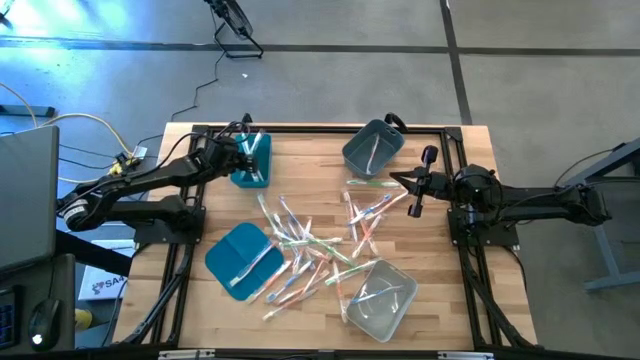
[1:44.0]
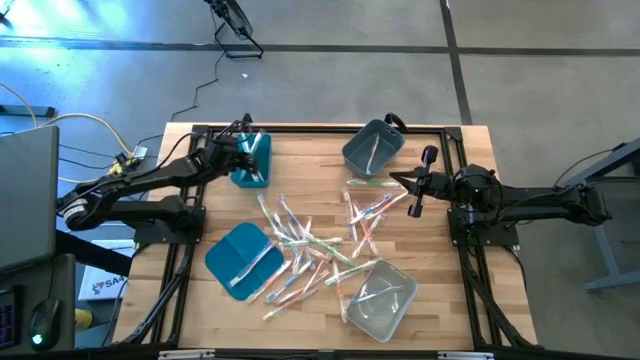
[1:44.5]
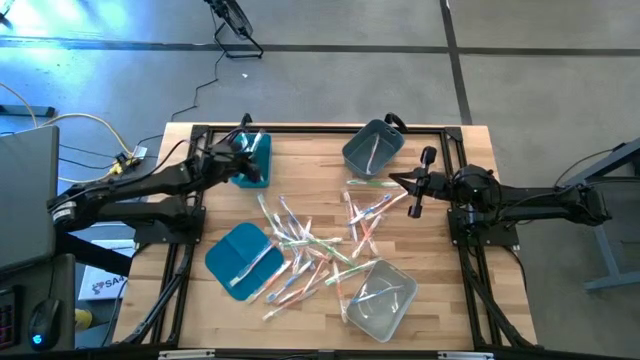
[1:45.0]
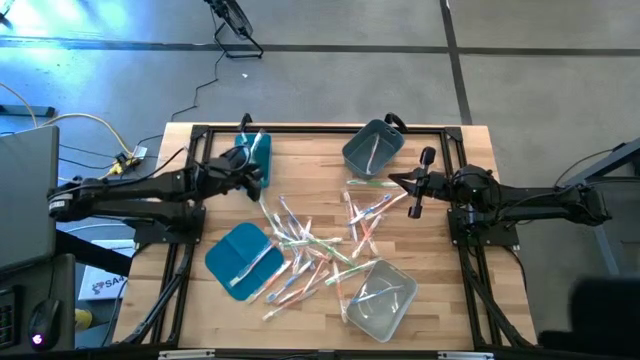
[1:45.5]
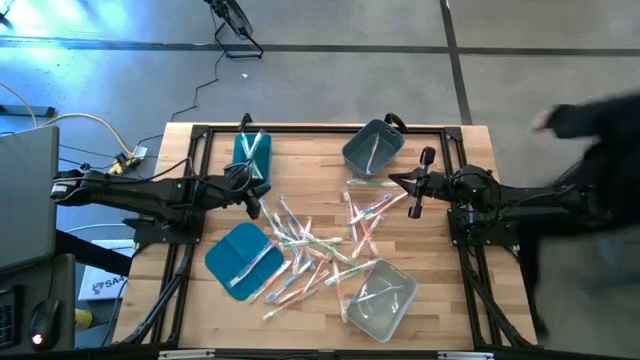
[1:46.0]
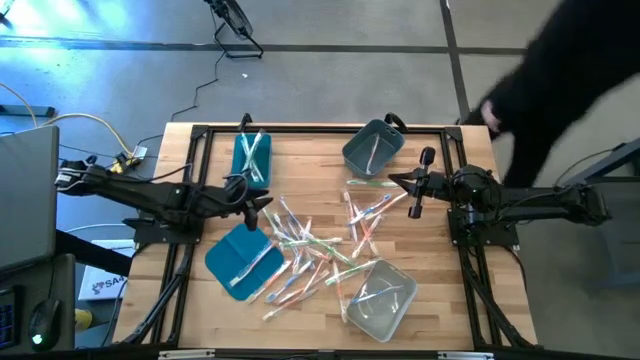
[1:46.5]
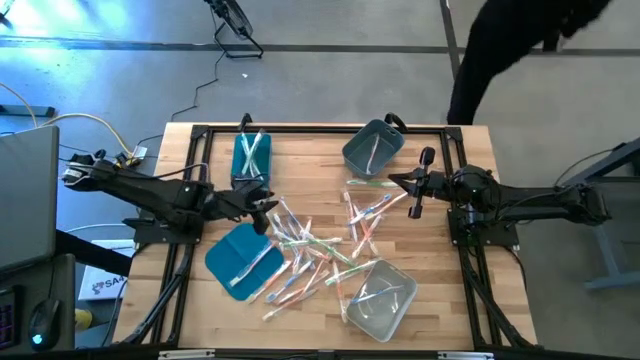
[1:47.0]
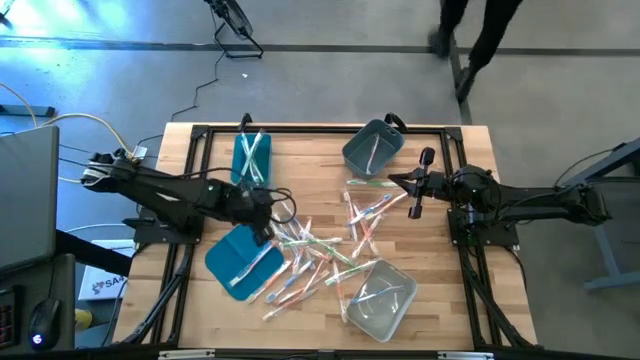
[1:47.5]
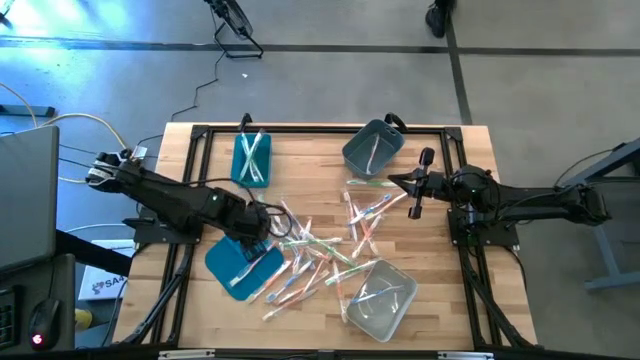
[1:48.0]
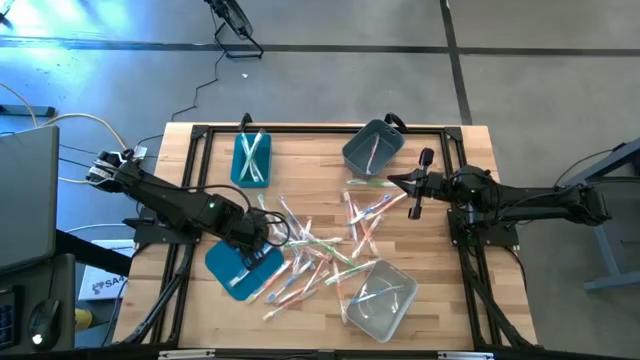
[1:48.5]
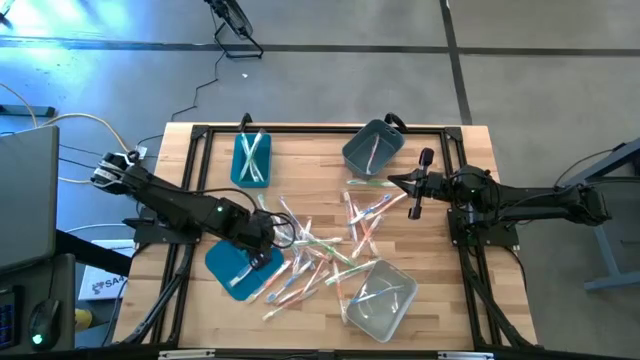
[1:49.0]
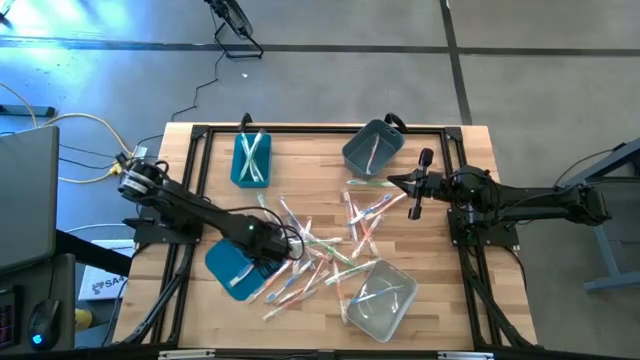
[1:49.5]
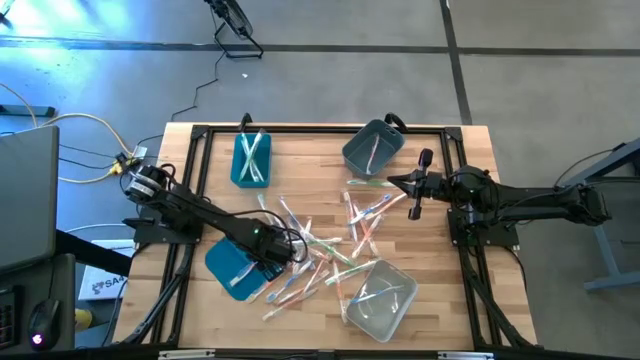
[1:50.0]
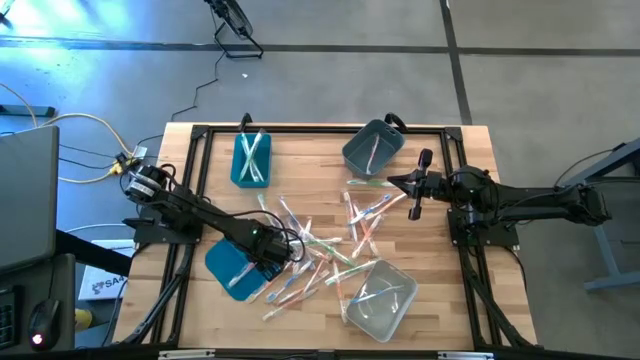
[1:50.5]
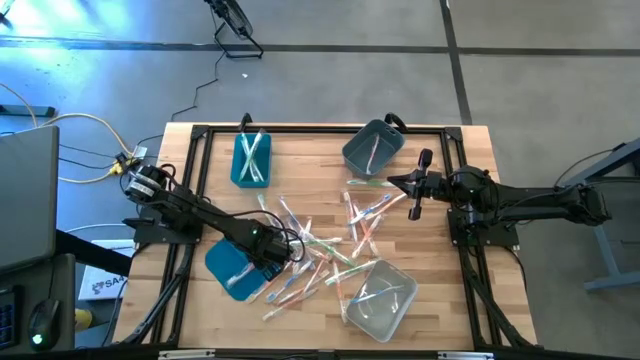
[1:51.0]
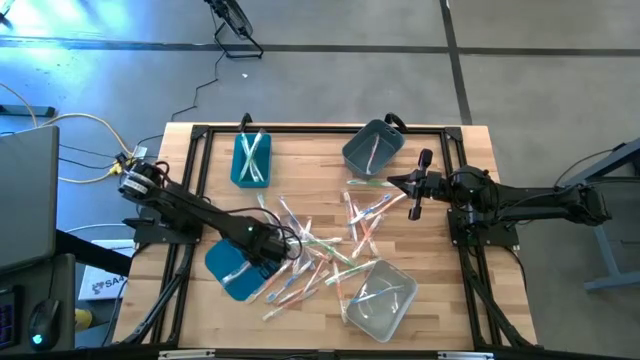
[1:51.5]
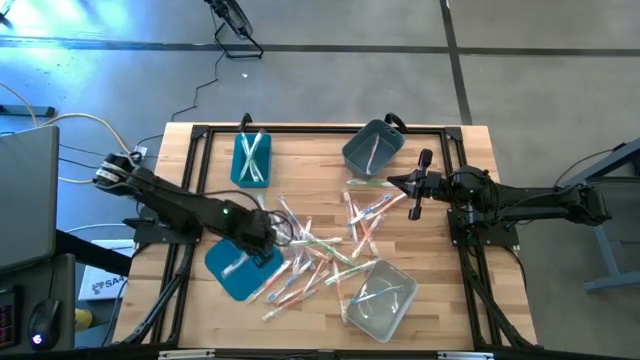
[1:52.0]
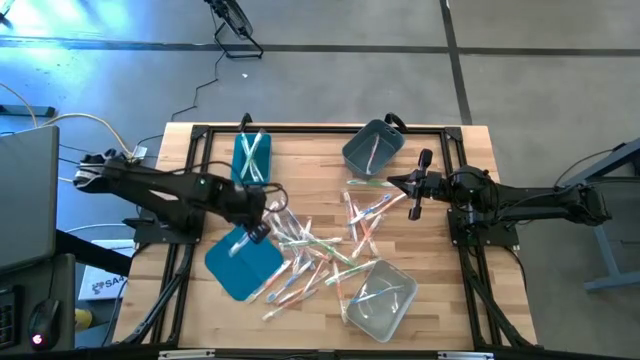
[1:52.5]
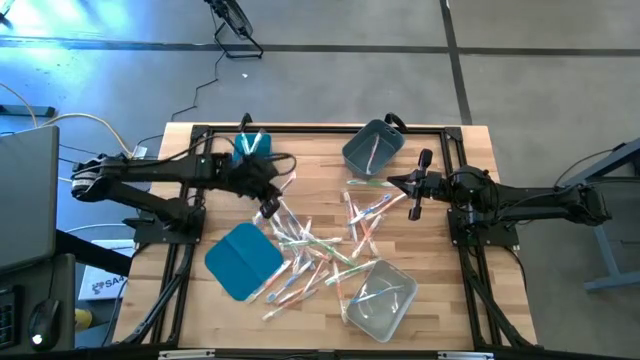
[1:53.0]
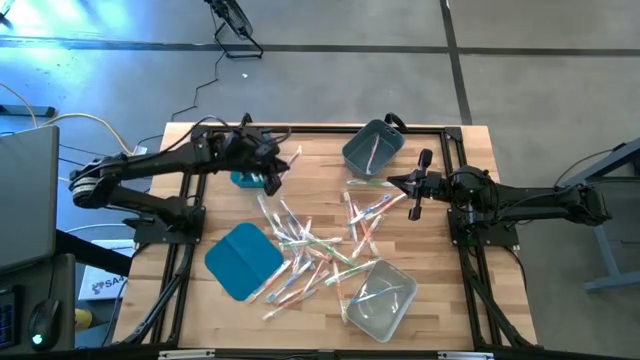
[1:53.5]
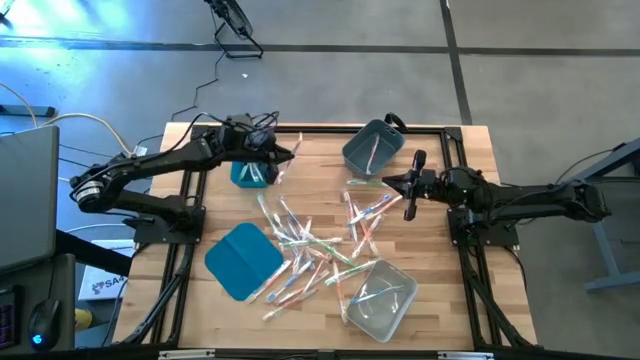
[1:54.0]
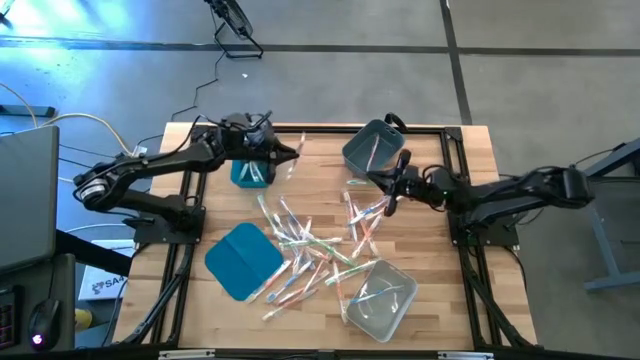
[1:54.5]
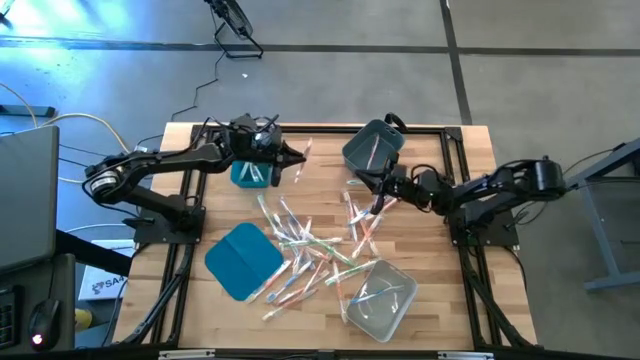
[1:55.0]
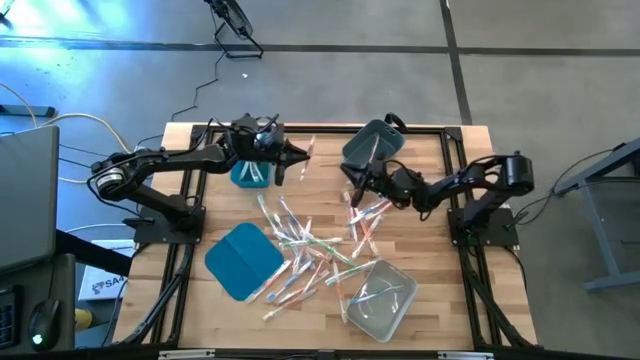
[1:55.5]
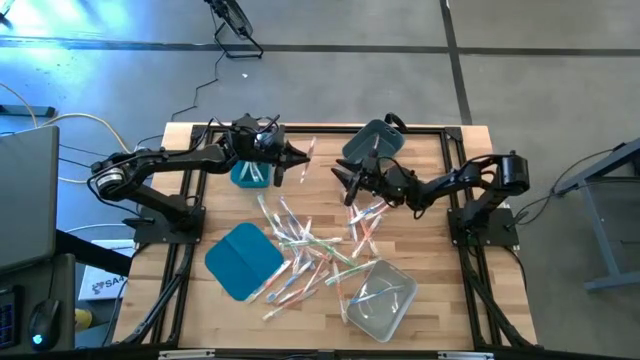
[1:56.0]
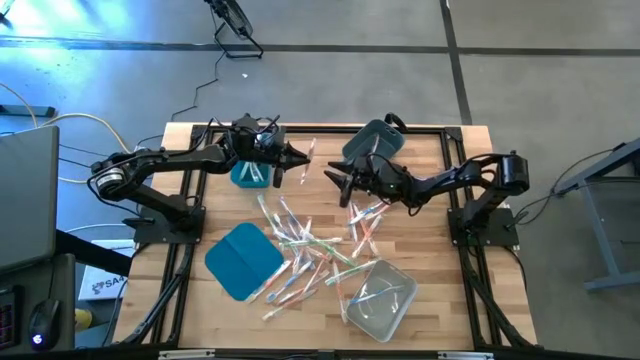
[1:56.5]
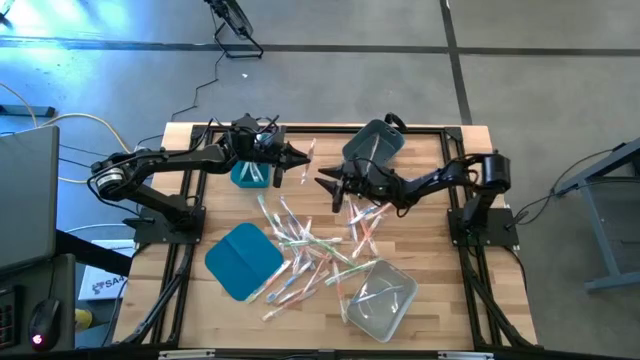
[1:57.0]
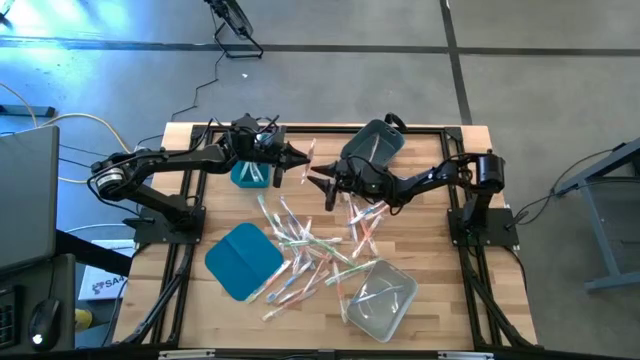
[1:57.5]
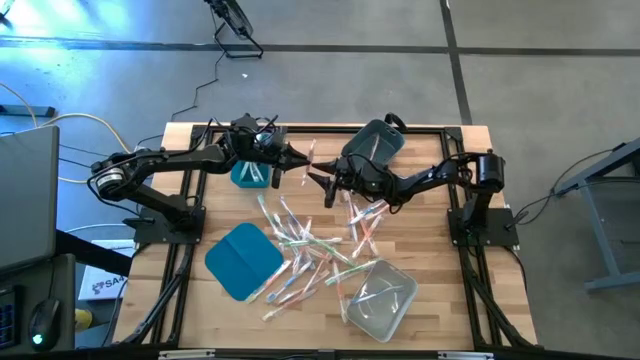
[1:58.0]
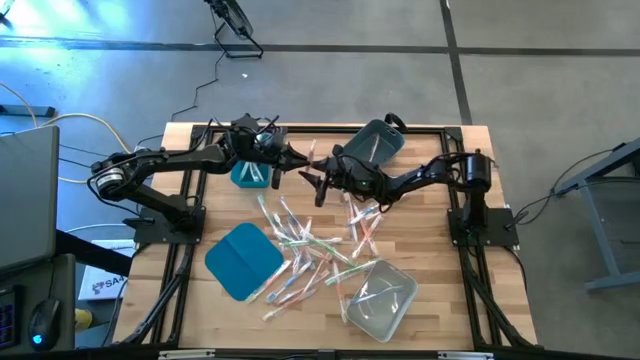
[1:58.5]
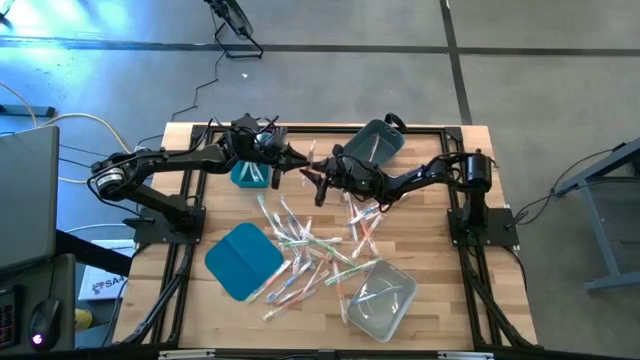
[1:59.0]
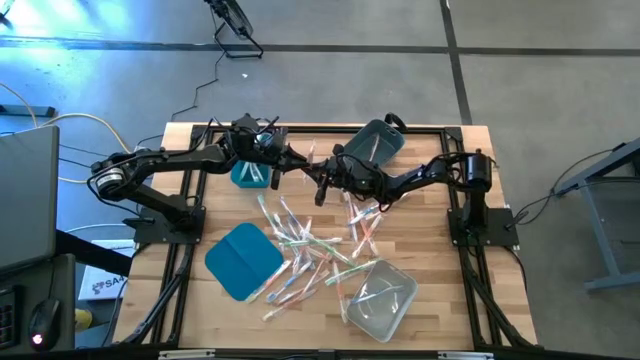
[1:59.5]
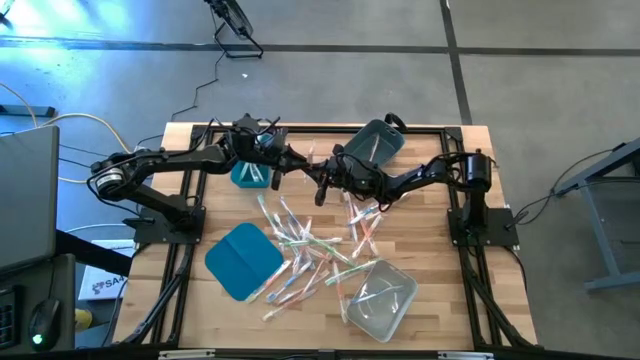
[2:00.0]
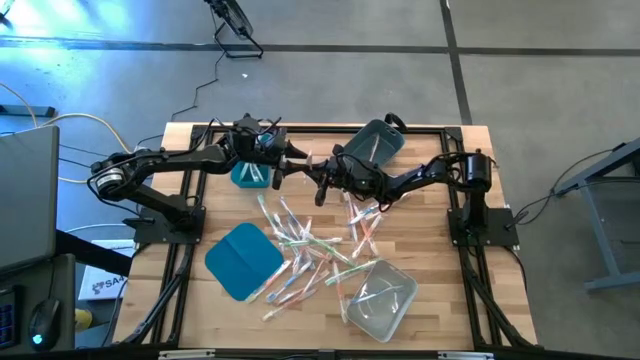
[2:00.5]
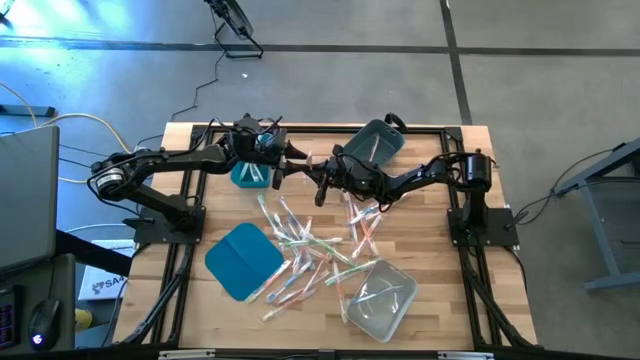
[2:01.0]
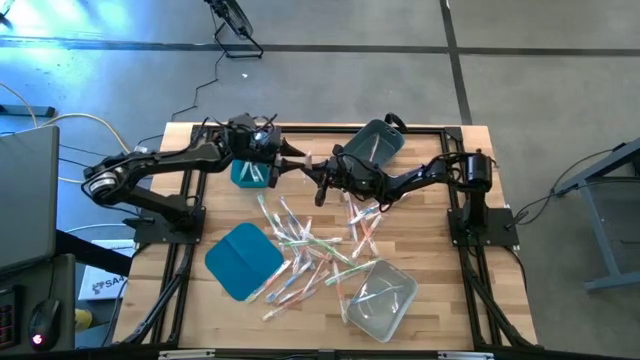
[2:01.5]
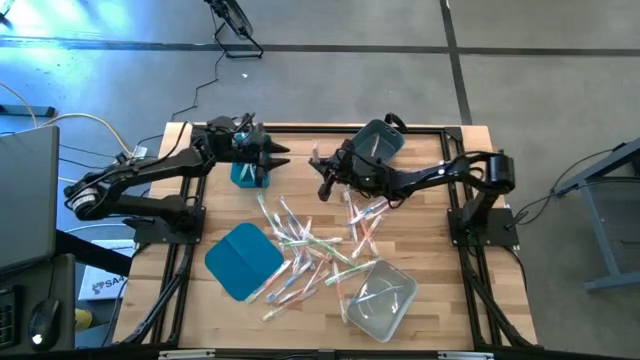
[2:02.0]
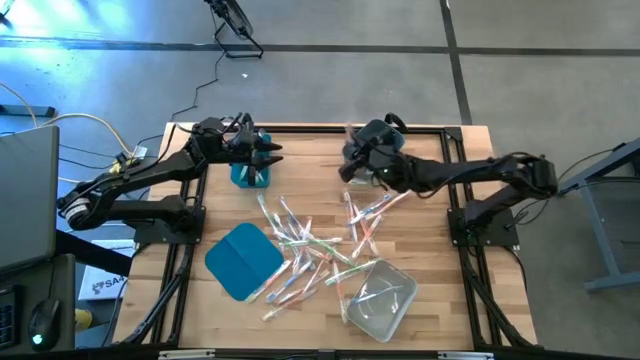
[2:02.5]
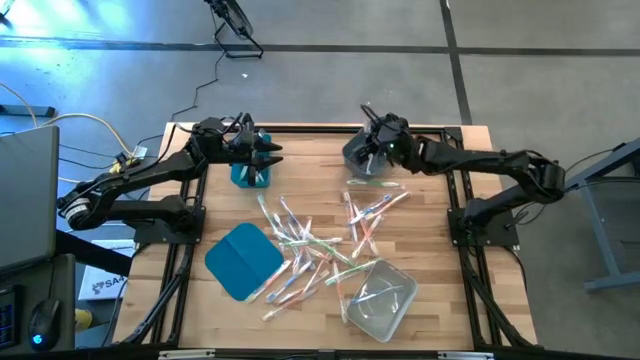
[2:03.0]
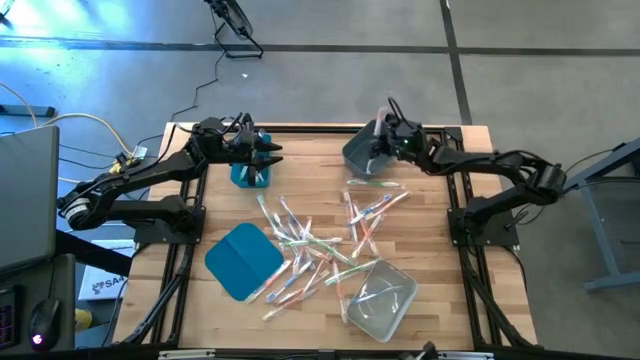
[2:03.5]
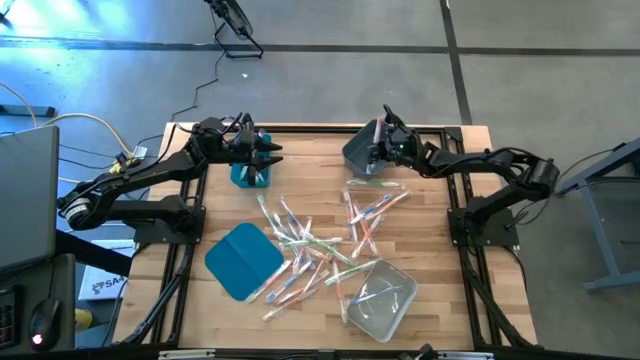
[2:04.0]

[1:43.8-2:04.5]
Task: Pick & Place Toothbrushes
Put the orange toothbrush into the dark gray bin
